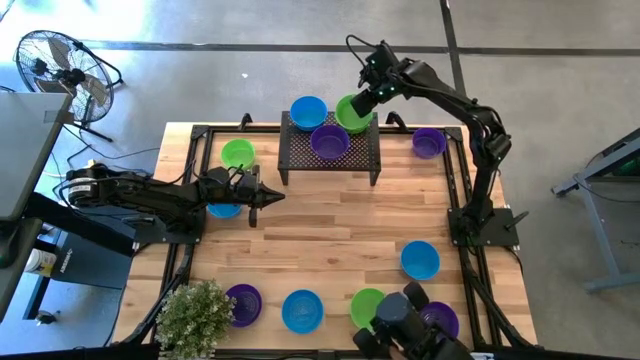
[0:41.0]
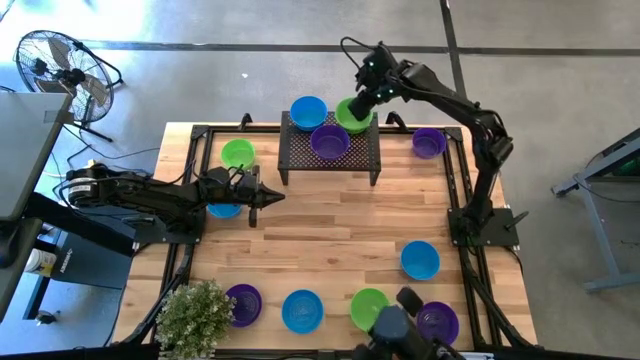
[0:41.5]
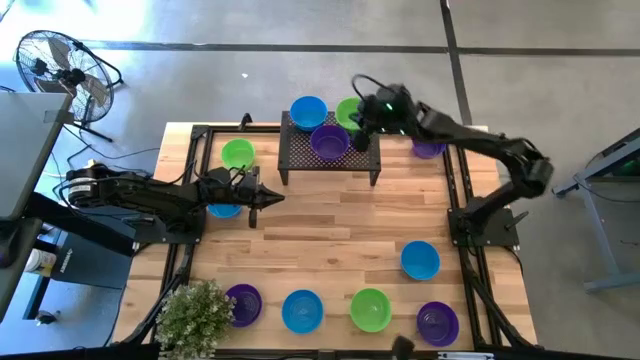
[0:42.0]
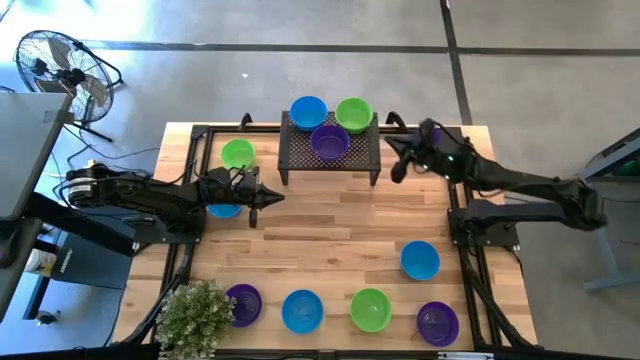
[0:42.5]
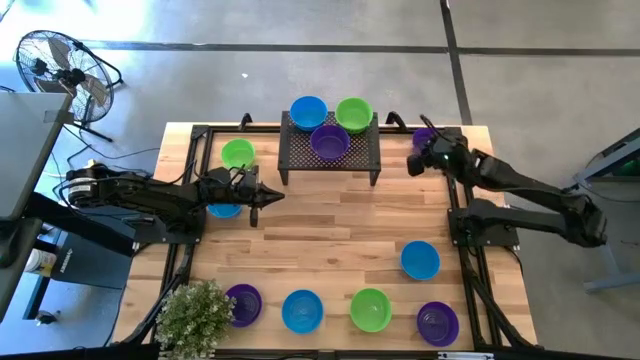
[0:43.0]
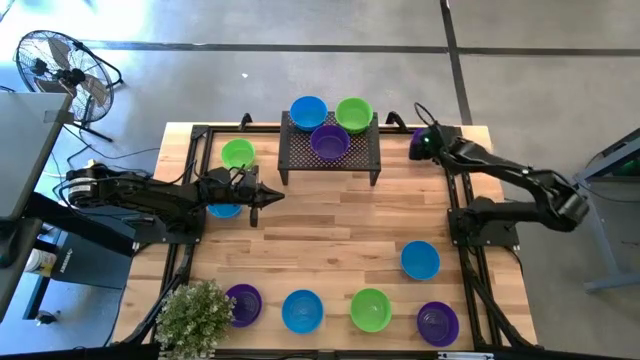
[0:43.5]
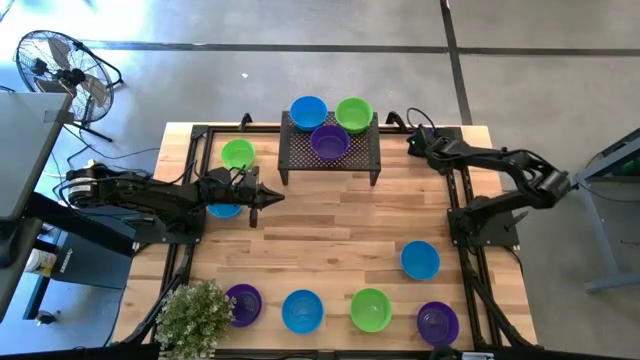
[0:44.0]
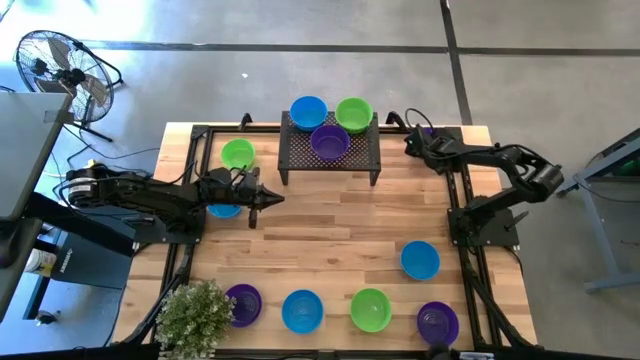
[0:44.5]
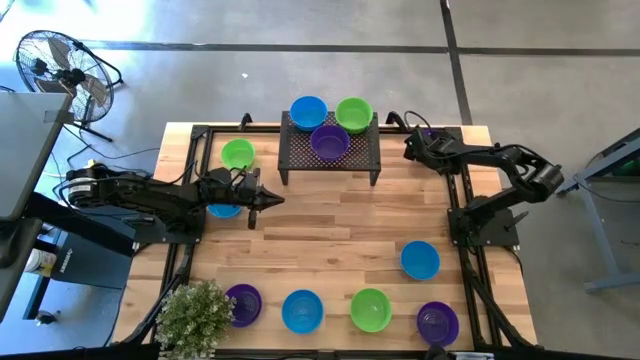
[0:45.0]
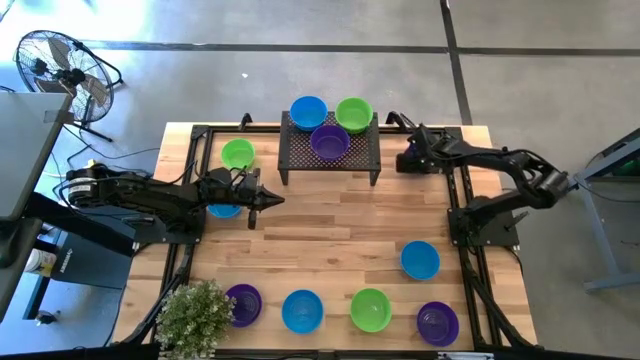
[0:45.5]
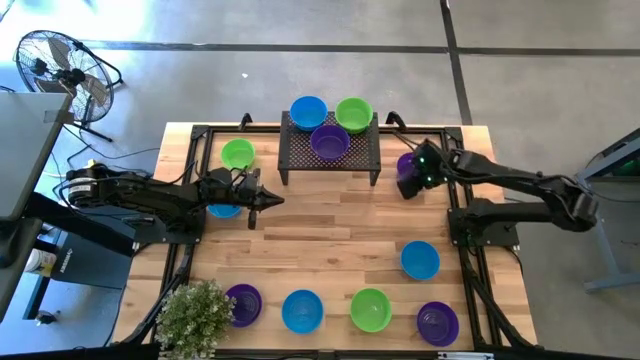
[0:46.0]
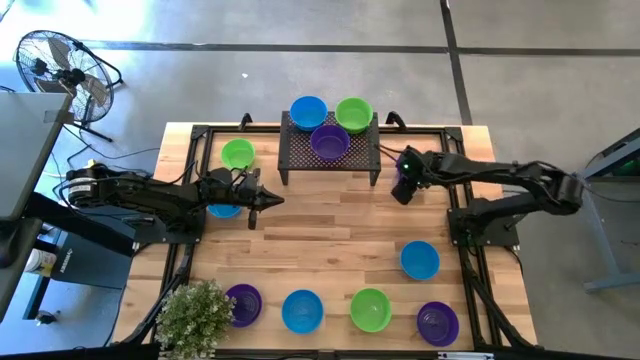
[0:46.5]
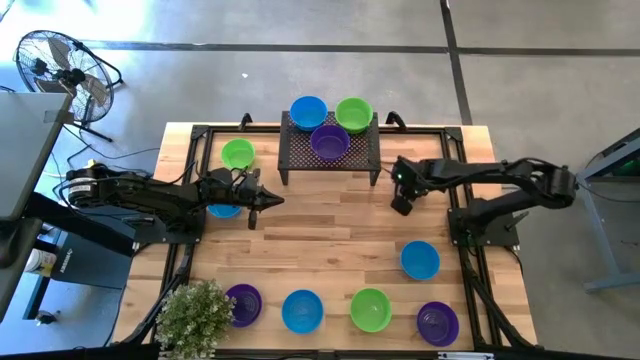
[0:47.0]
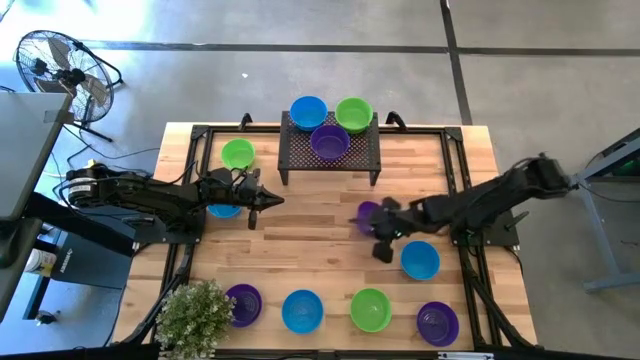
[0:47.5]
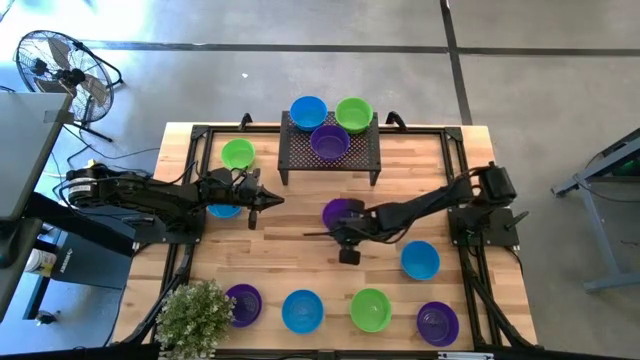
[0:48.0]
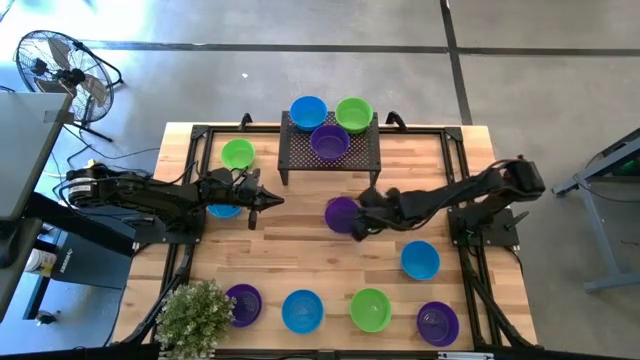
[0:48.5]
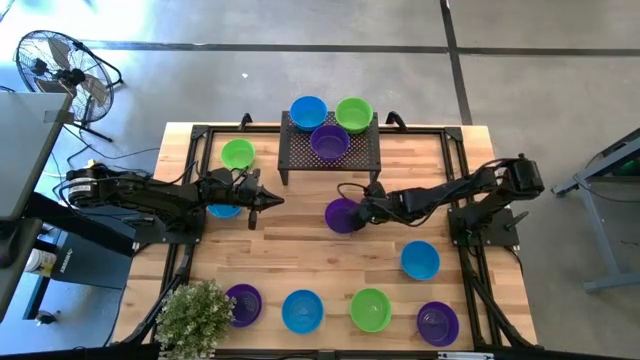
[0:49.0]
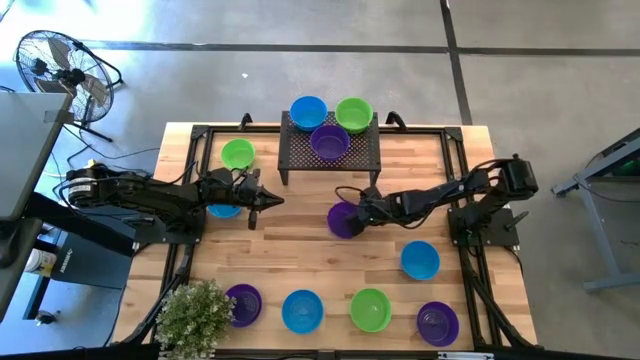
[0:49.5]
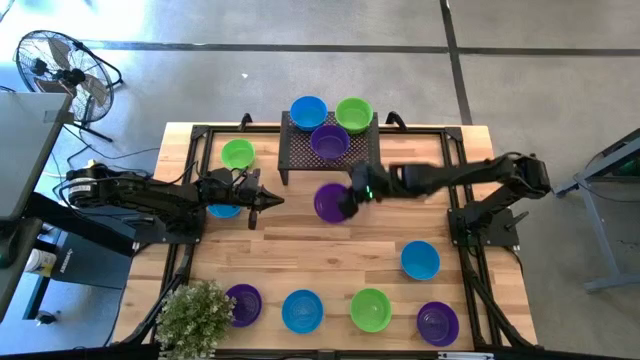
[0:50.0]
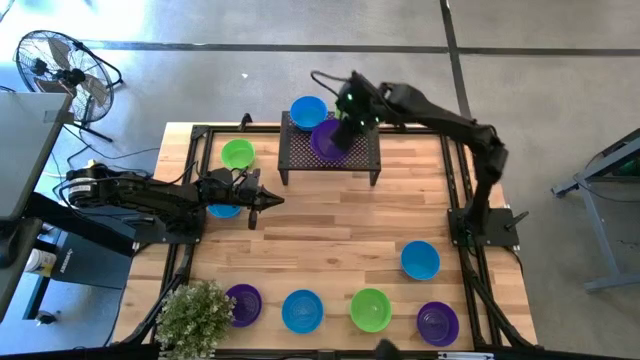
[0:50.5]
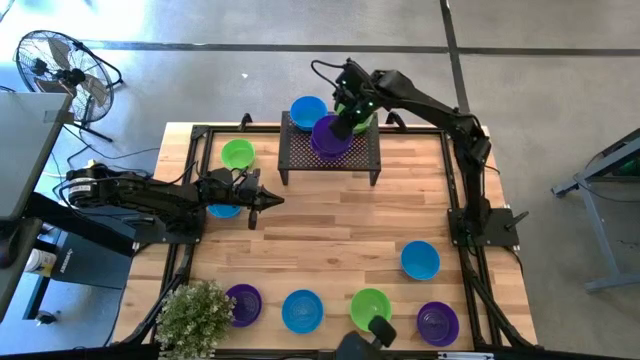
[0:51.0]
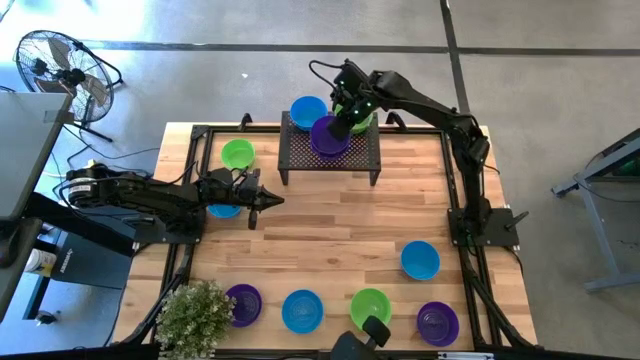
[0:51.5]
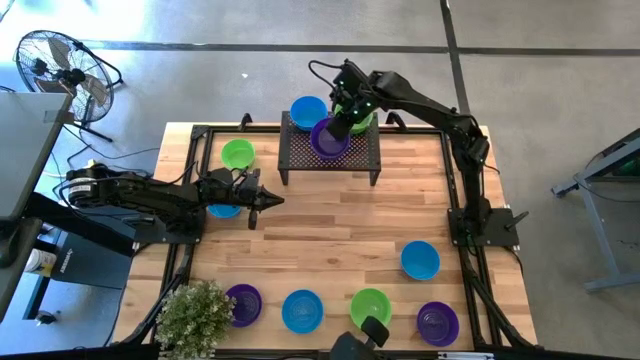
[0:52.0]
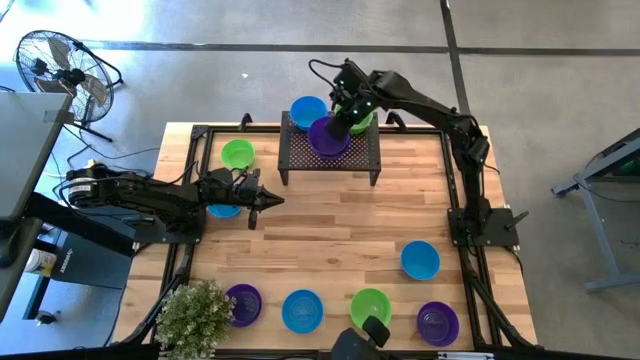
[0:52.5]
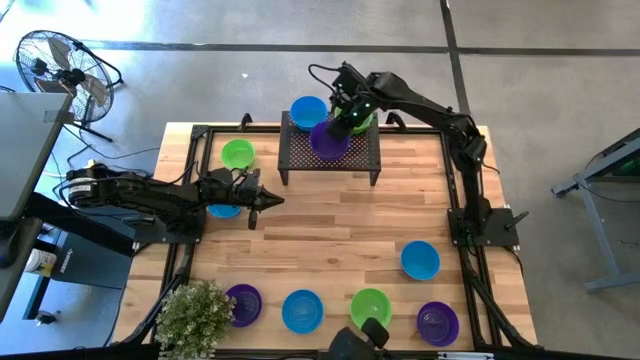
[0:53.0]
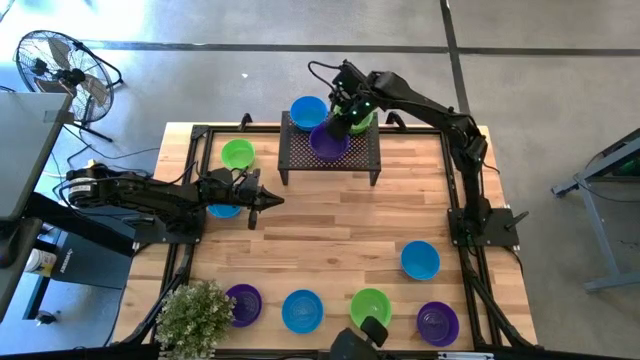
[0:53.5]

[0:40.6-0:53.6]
Task: Pick & Place Mini bowls
Stack the top violet bowl on the violet bowl on the shelf

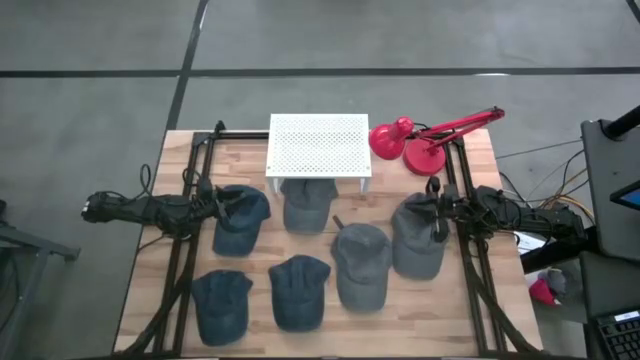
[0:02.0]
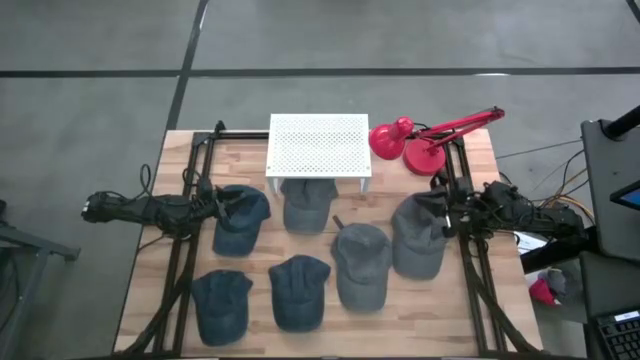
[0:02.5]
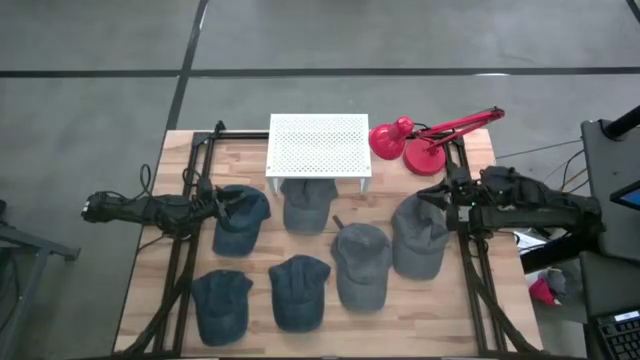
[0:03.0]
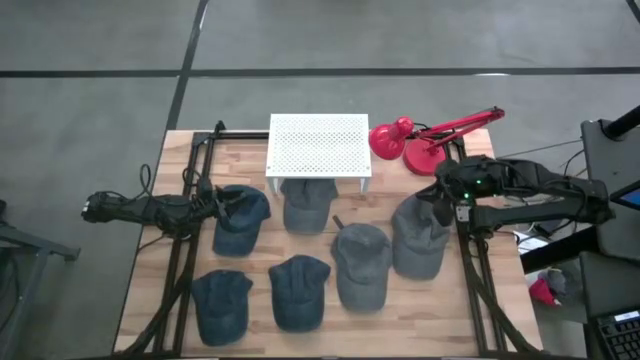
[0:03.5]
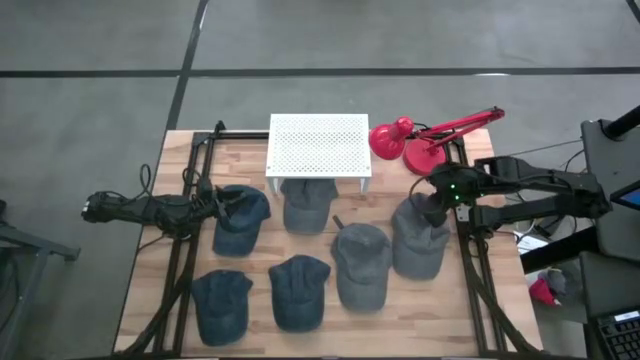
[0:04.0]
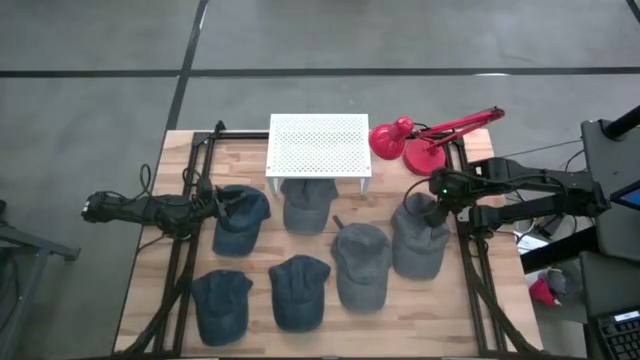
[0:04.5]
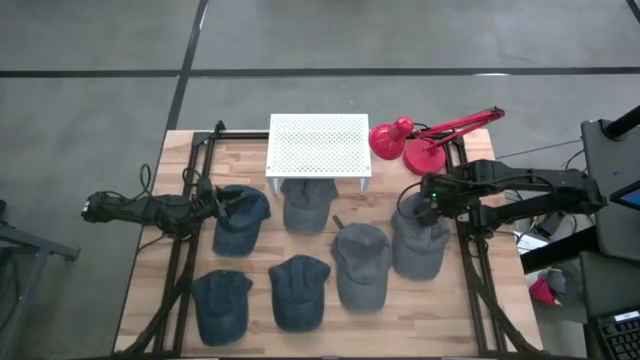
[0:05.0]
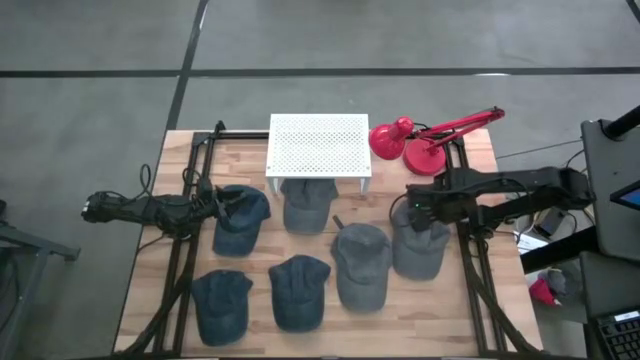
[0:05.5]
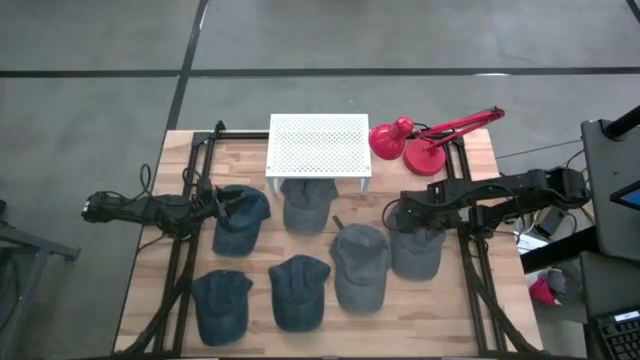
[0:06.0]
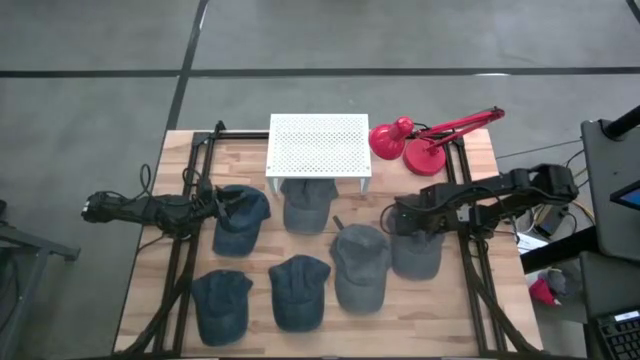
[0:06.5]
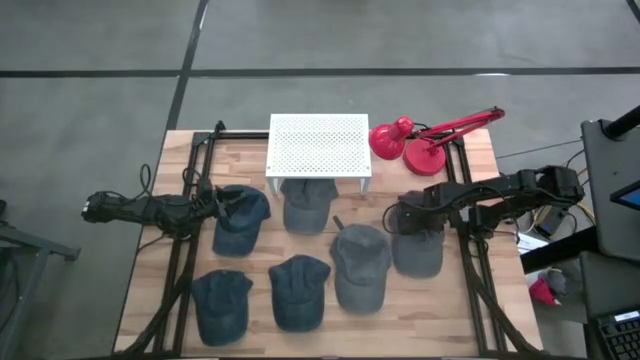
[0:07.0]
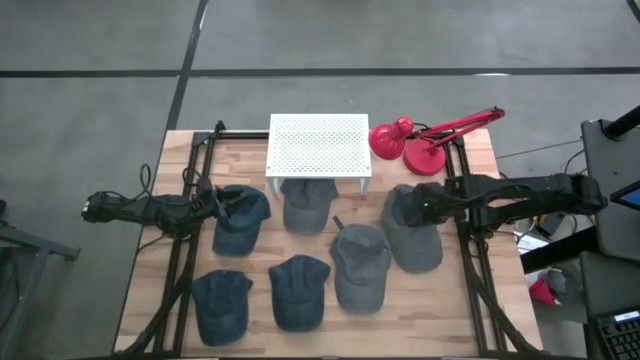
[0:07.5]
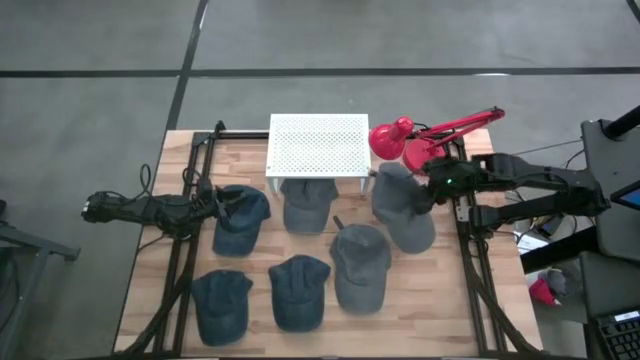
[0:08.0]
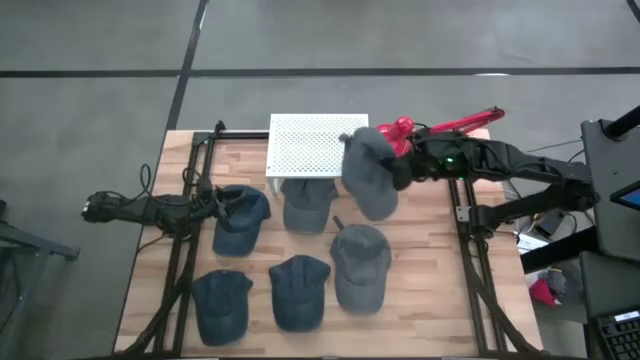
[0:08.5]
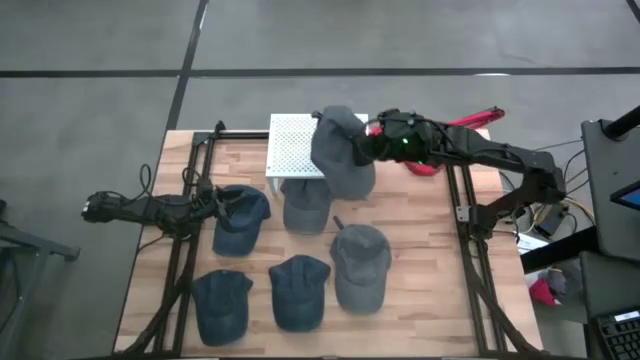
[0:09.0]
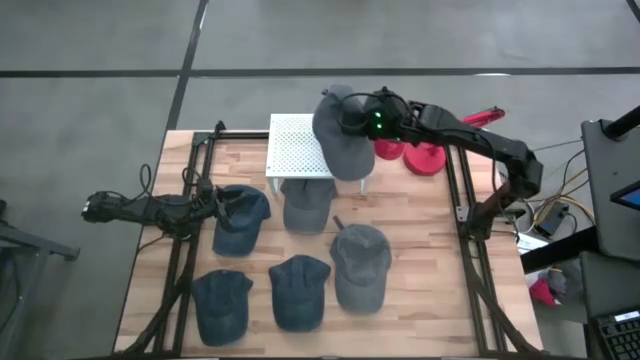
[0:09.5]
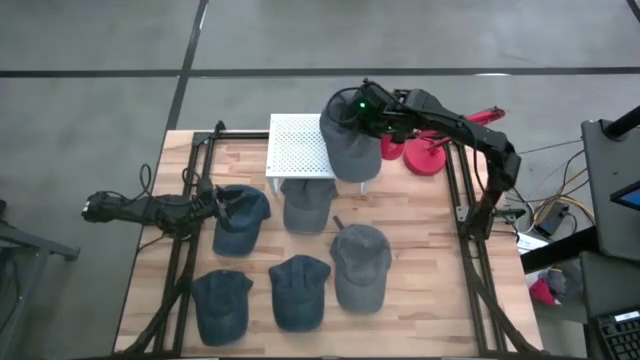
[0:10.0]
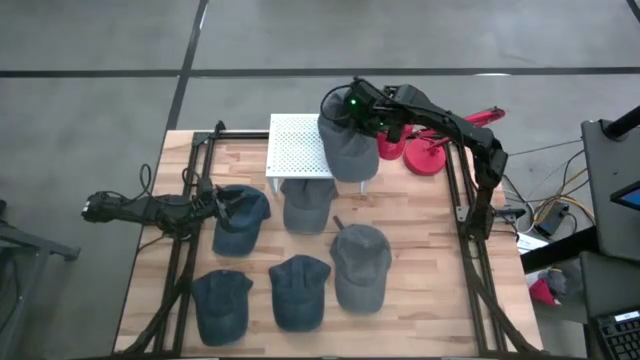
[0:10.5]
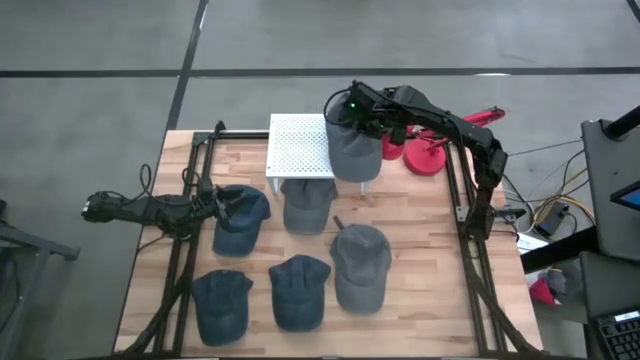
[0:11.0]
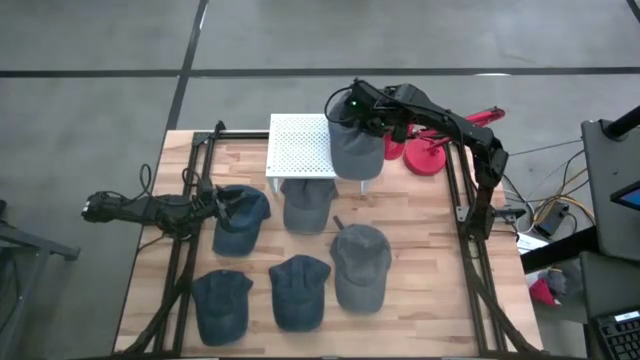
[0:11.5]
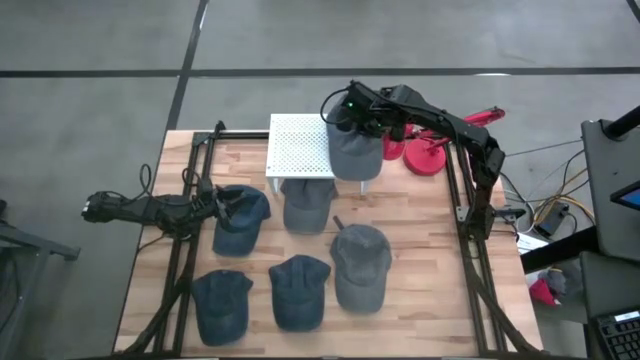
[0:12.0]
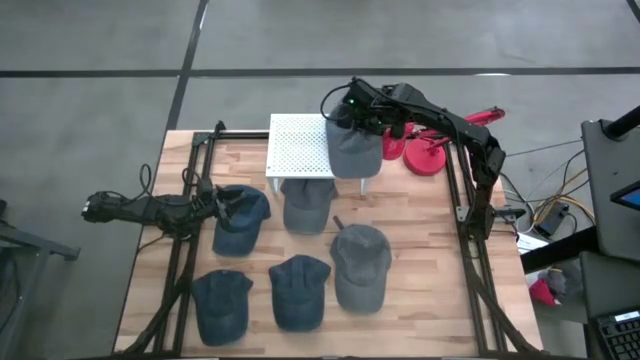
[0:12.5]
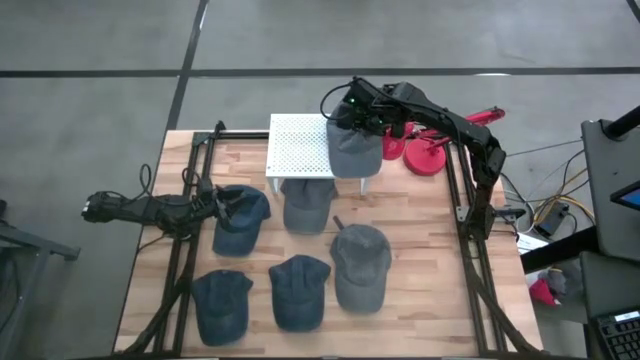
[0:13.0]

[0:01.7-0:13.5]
Task: Stack small to large cups/mugs on shelf
Put the right gray cup on the shelf
